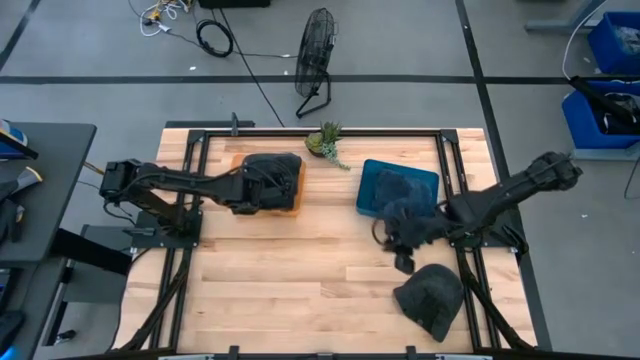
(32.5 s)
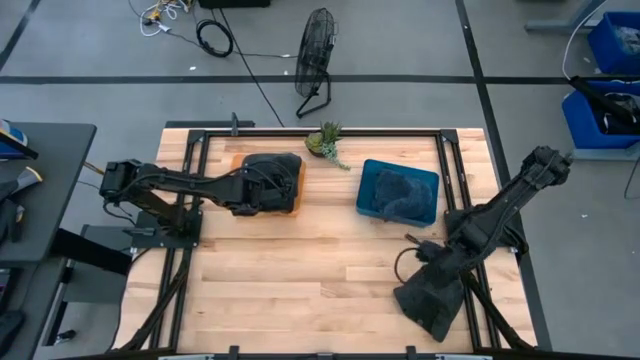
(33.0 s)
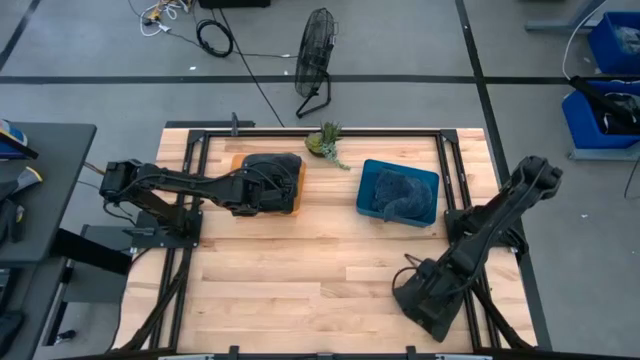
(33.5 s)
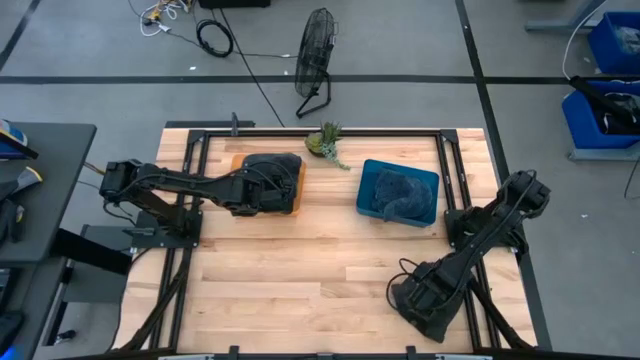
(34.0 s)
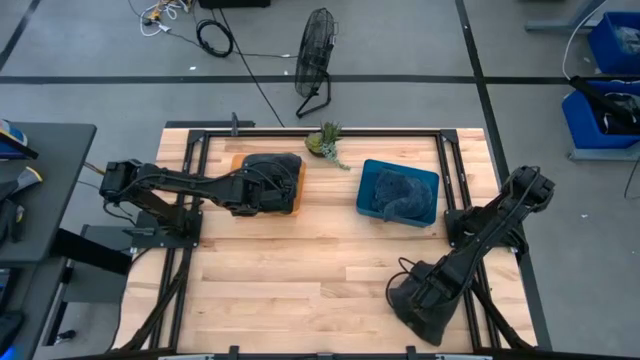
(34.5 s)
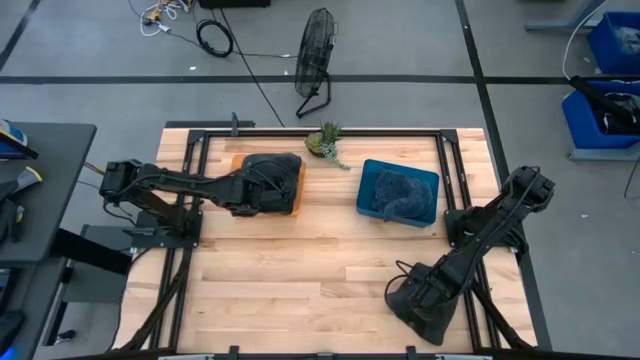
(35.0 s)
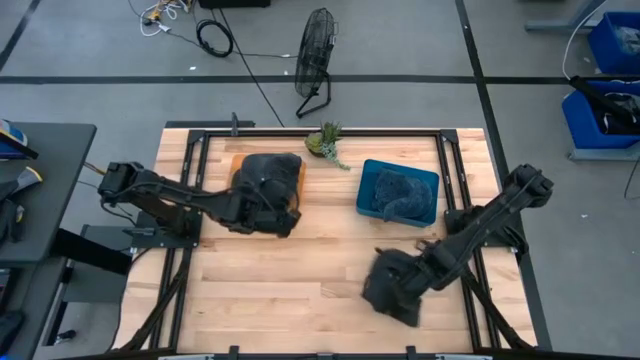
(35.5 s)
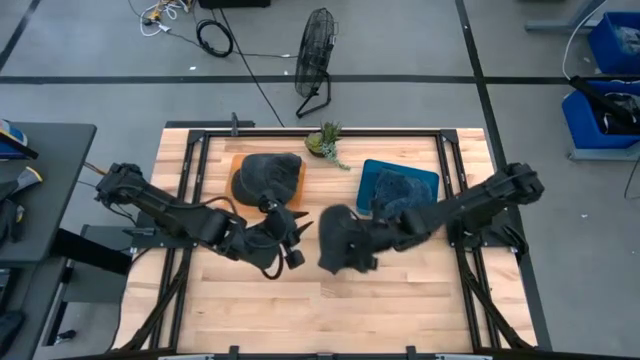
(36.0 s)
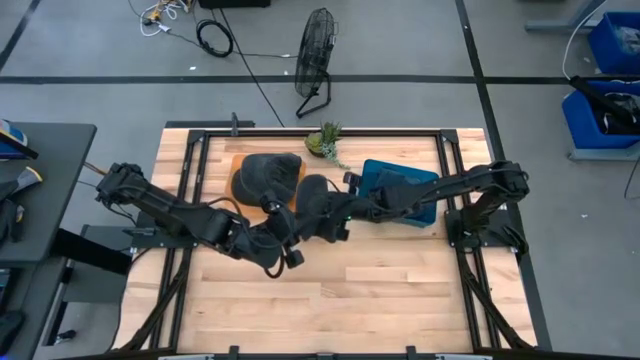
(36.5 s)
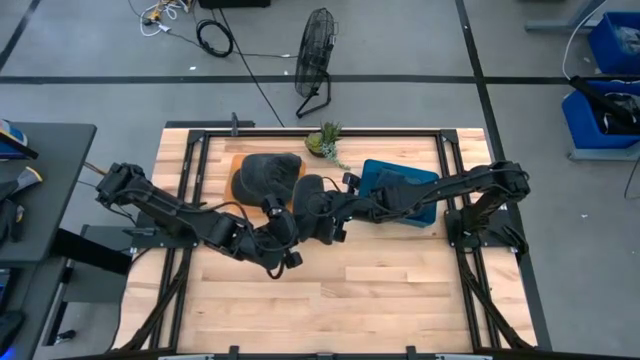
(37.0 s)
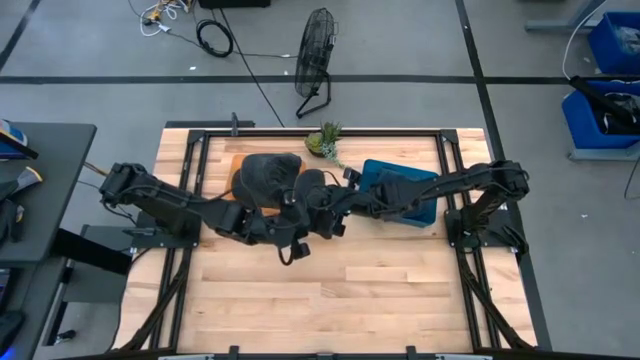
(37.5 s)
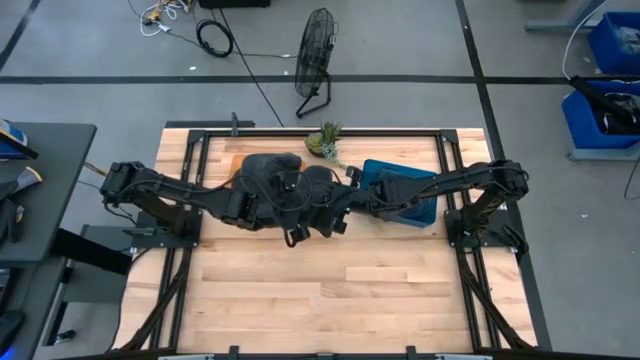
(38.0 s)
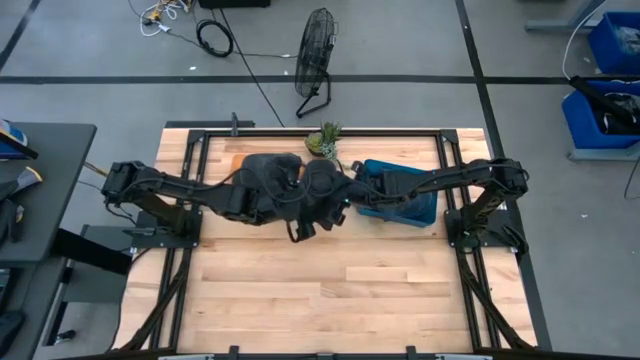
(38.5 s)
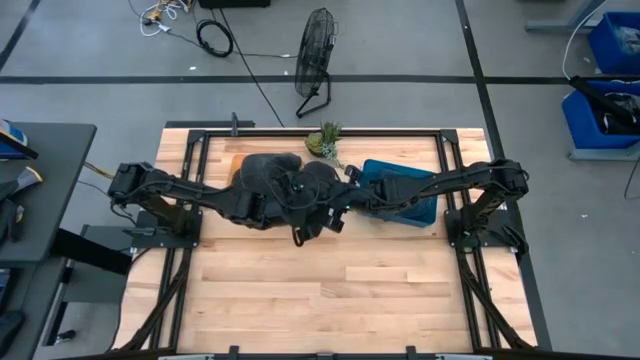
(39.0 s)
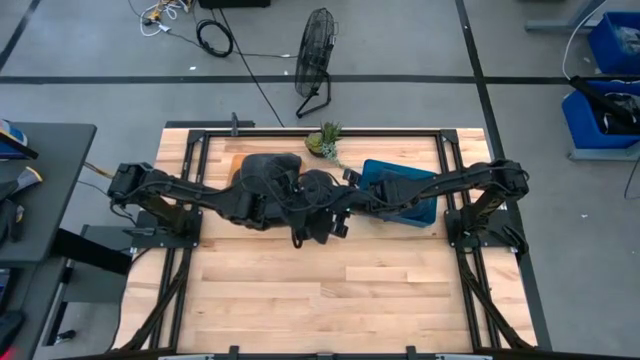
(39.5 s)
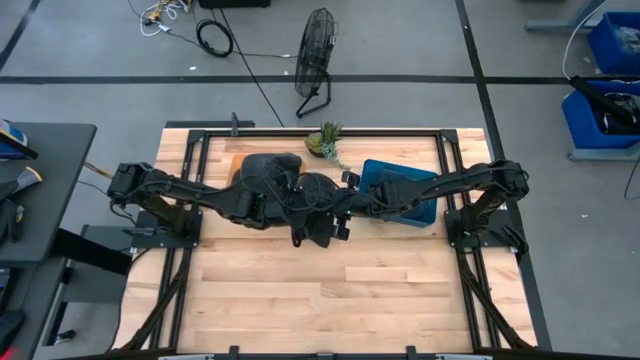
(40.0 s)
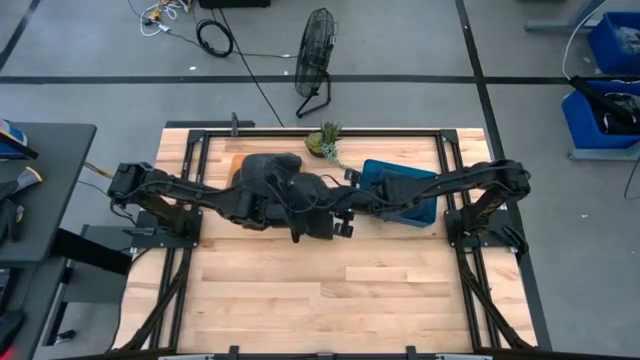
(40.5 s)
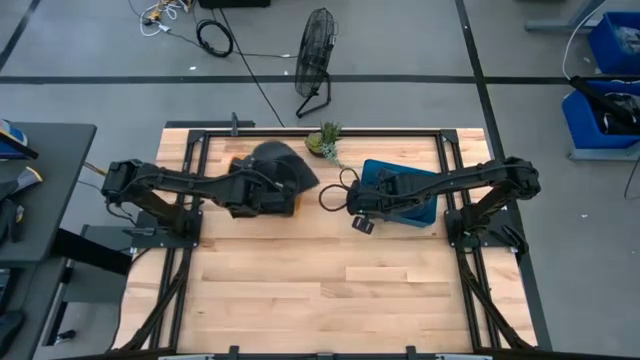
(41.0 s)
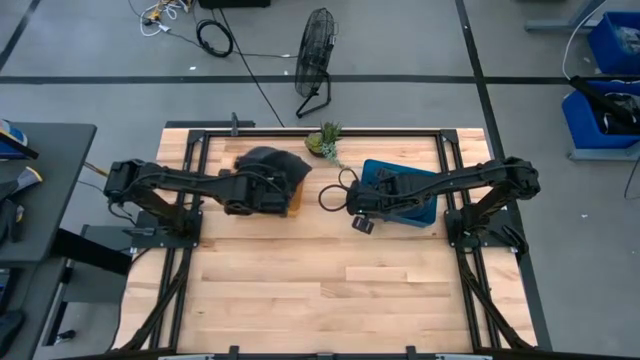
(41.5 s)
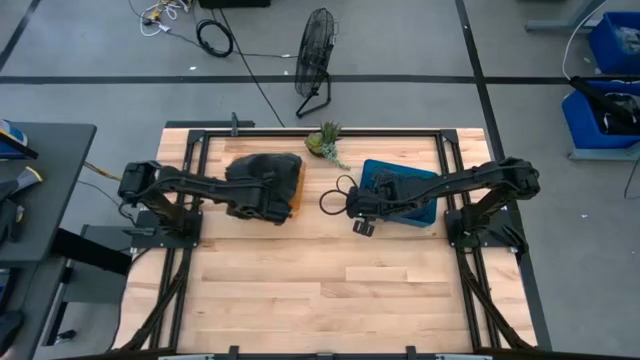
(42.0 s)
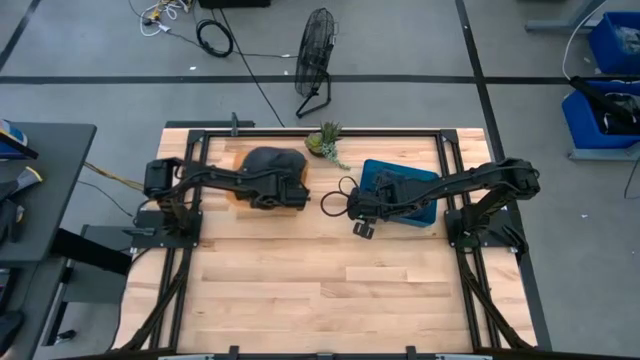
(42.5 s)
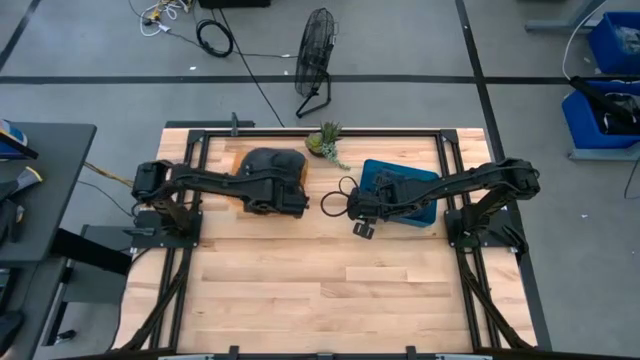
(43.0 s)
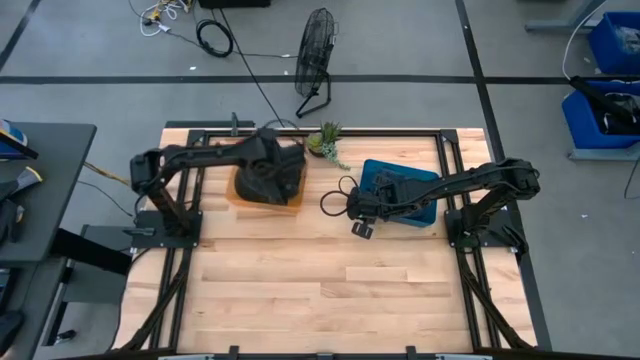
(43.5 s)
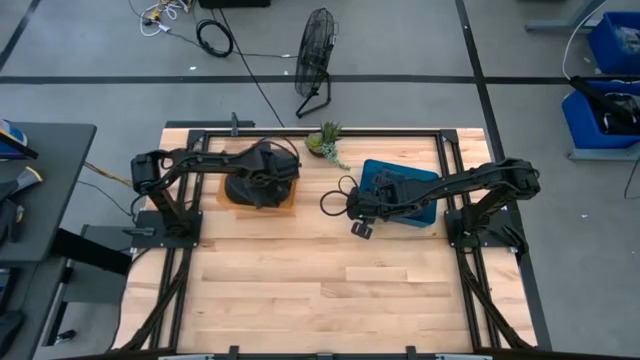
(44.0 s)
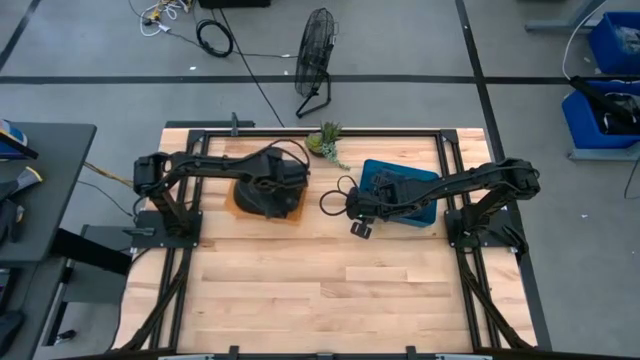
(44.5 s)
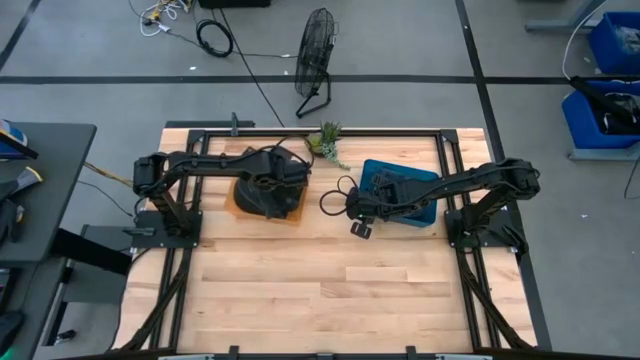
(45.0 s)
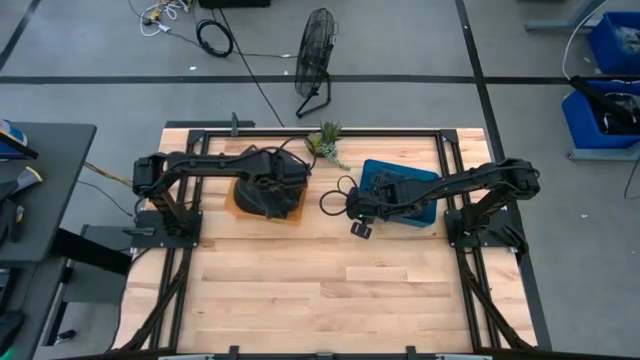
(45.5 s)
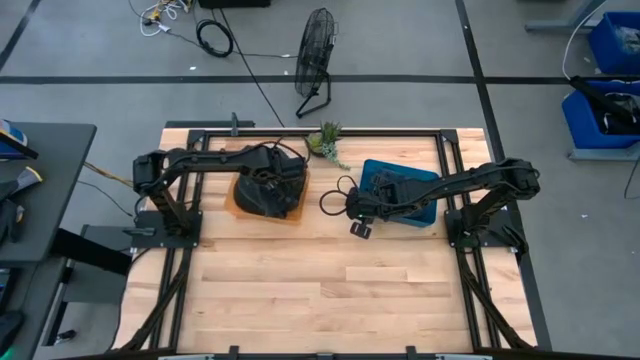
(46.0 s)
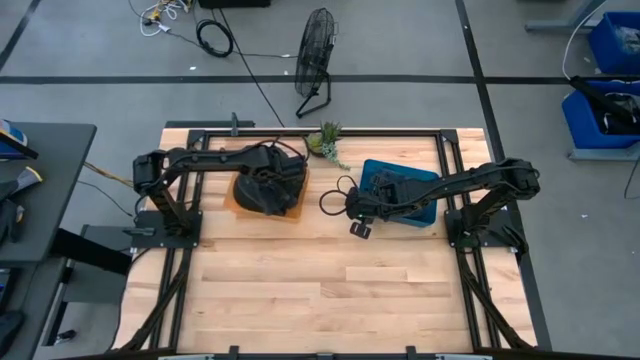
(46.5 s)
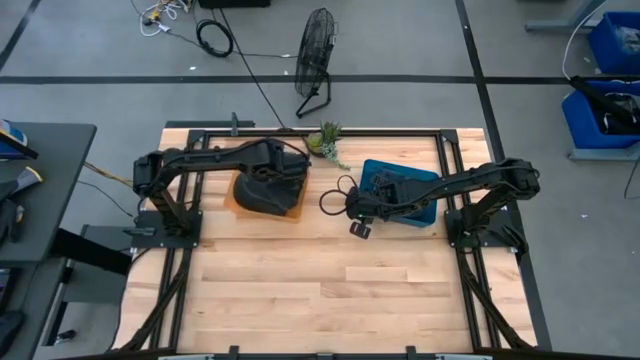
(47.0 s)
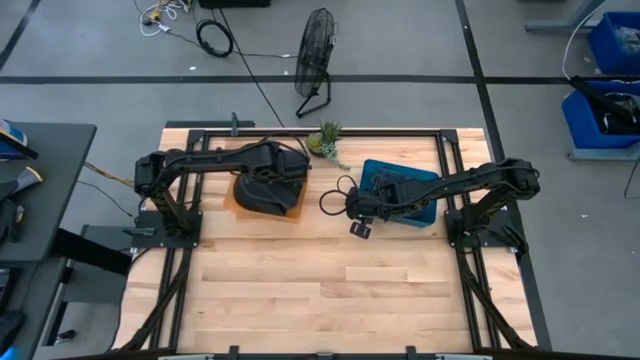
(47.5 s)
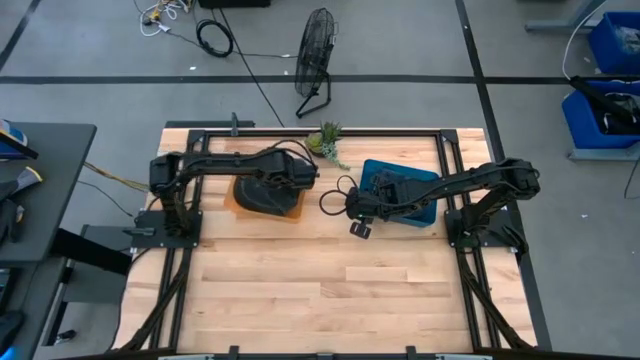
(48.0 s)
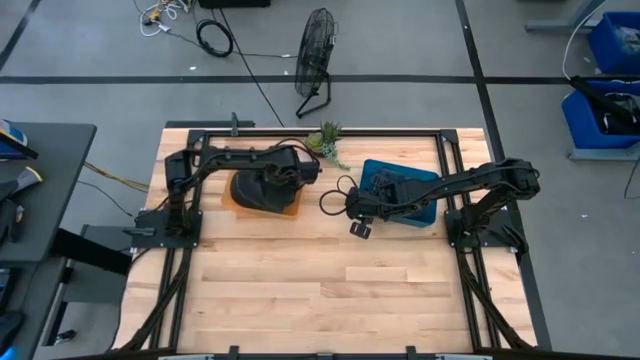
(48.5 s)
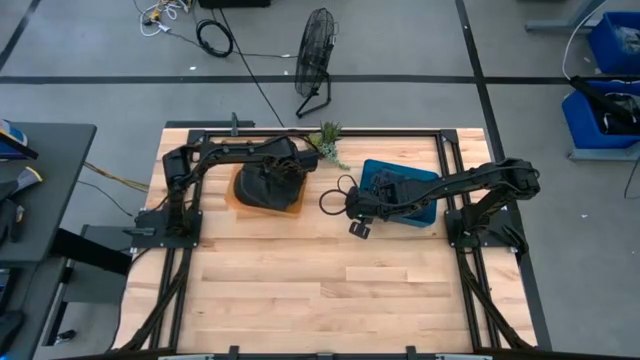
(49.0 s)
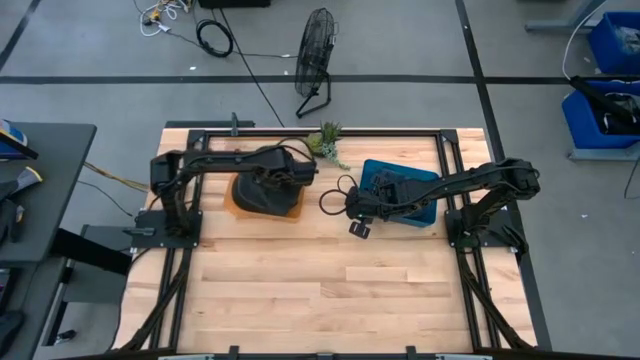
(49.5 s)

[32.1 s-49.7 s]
Task: Pick & Place hat
Put the black cap into the orange bin

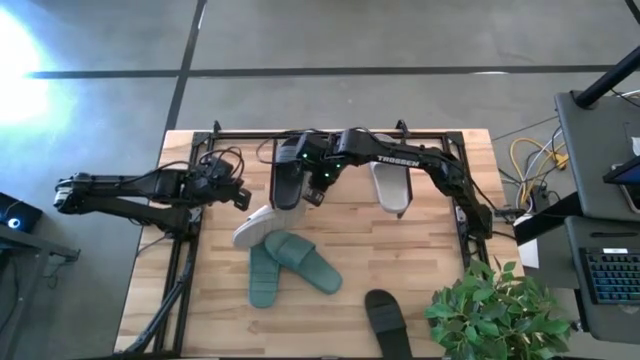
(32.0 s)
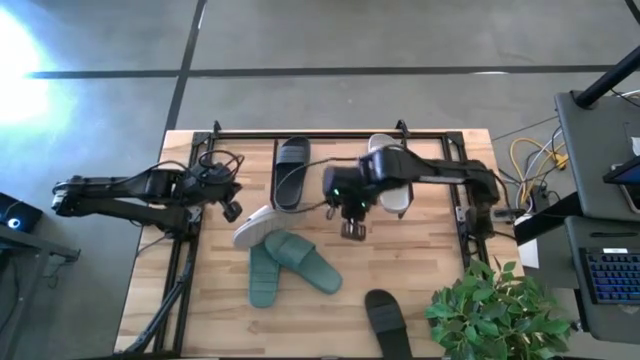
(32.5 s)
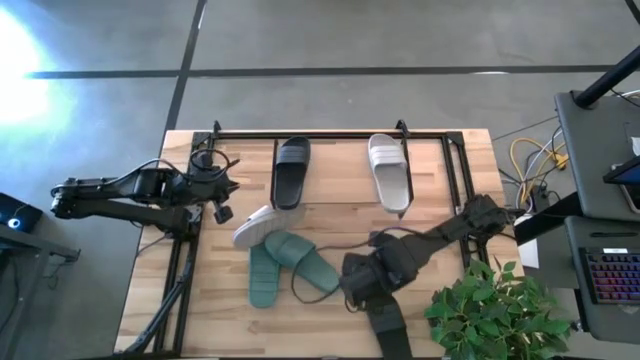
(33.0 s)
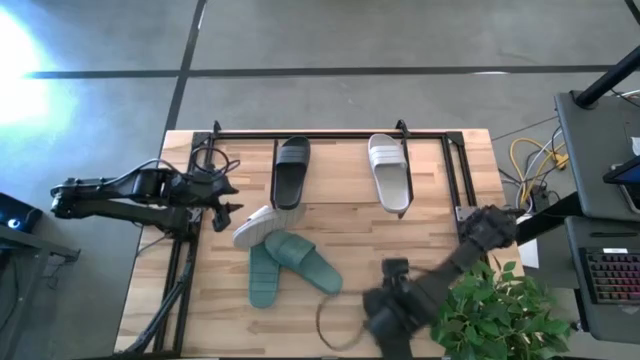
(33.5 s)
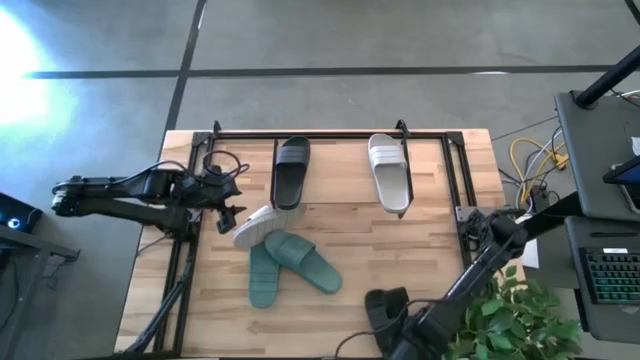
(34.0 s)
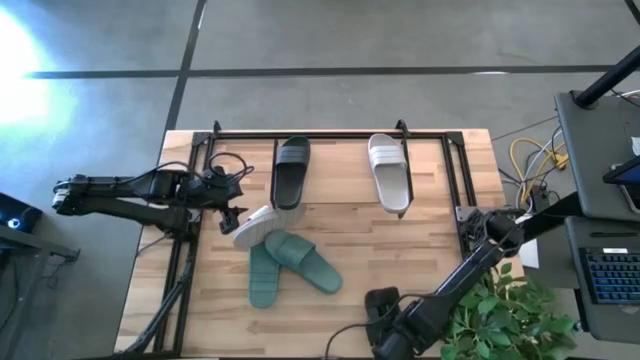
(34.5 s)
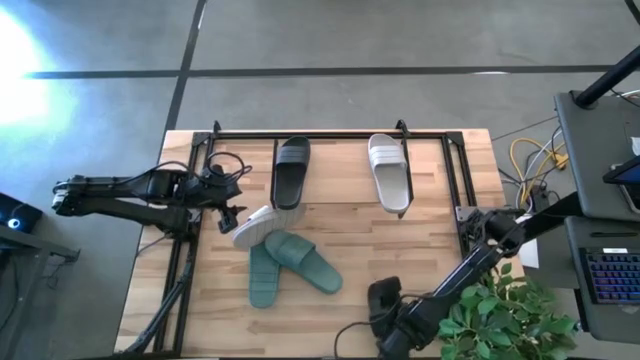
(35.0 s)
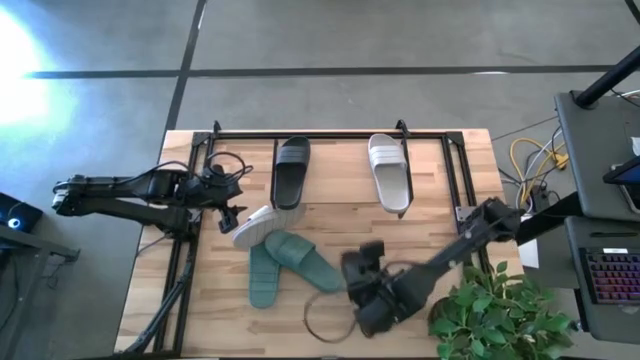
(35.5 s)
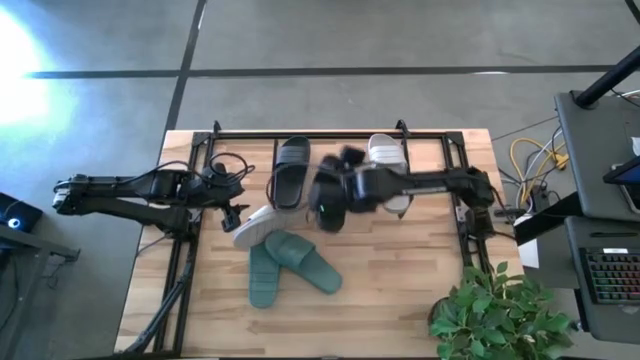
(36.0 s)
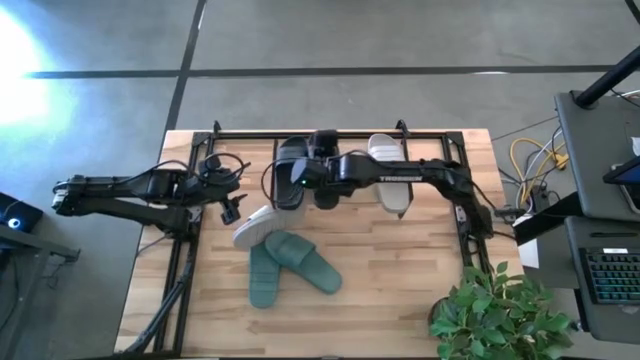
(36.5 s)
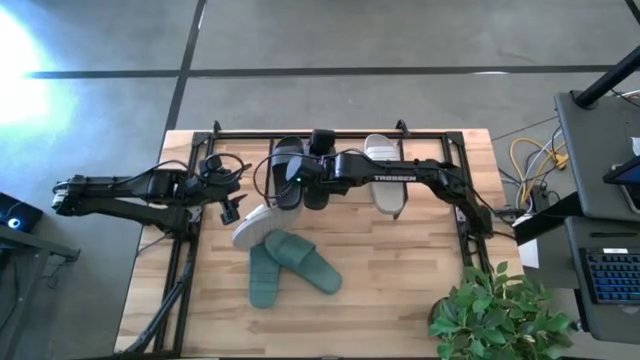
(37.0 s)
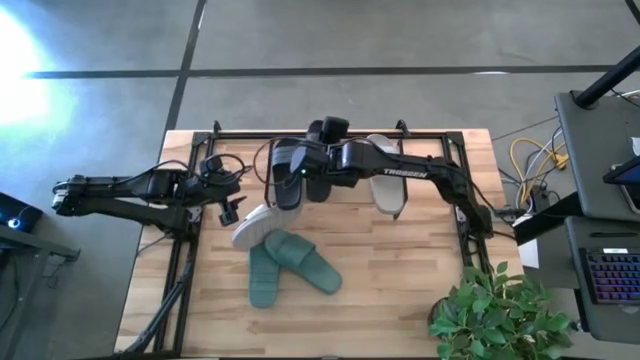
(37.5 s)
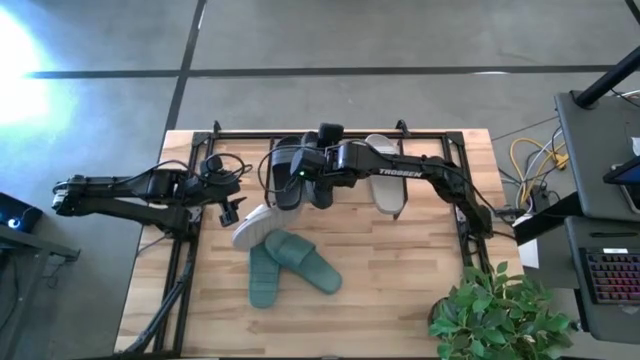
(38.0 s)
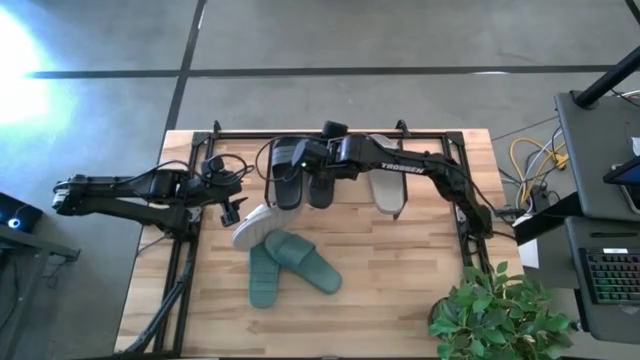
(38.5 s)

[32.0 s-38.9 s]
Task: Pick and place slides into the shelf
Put the black slide on the shelf
